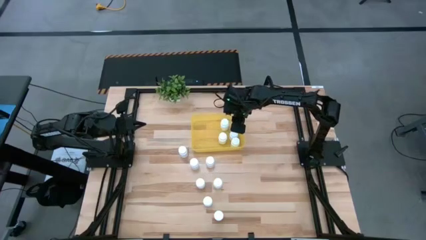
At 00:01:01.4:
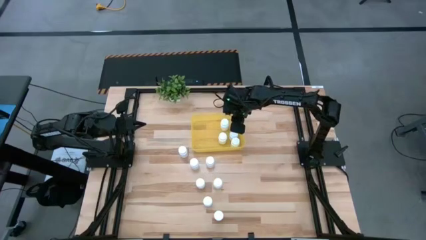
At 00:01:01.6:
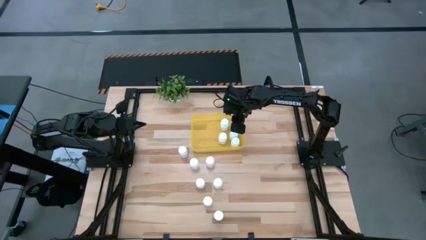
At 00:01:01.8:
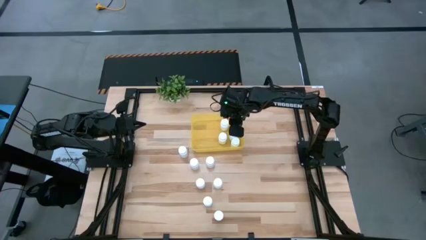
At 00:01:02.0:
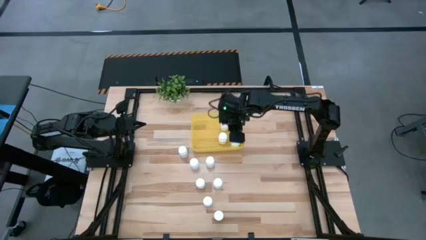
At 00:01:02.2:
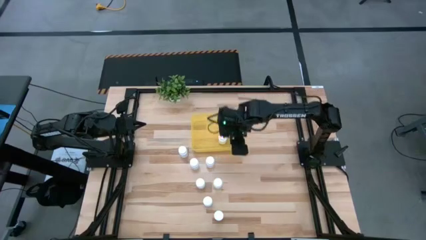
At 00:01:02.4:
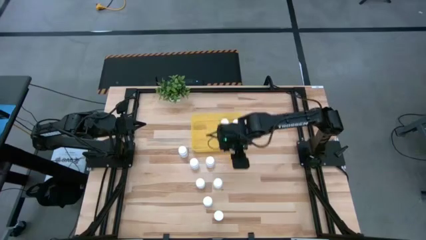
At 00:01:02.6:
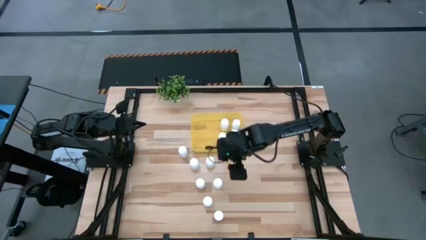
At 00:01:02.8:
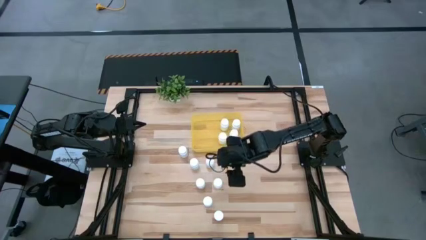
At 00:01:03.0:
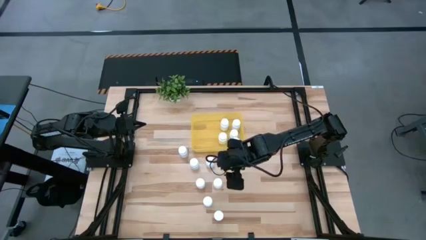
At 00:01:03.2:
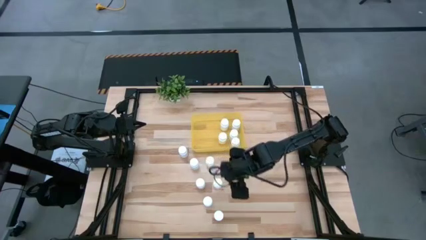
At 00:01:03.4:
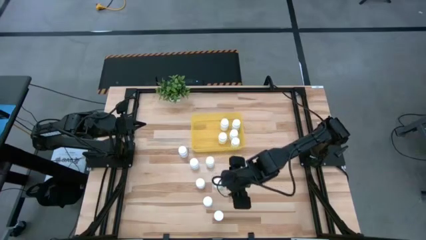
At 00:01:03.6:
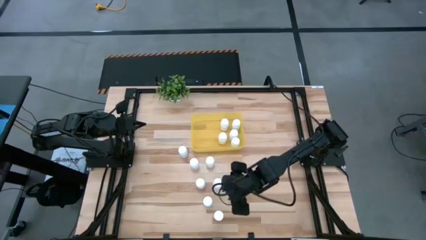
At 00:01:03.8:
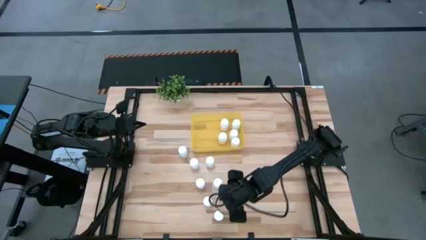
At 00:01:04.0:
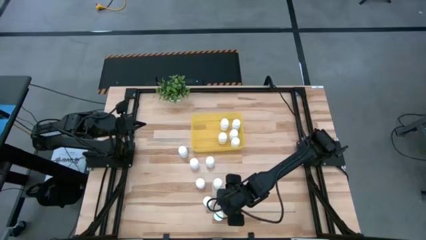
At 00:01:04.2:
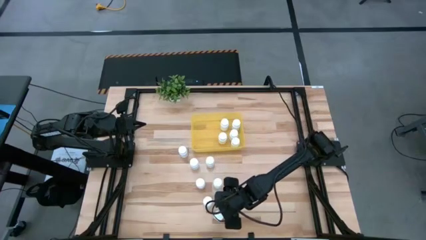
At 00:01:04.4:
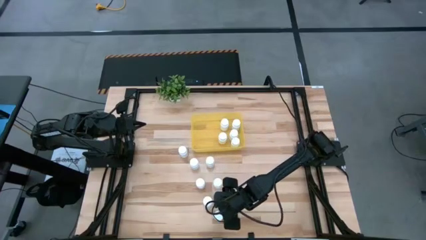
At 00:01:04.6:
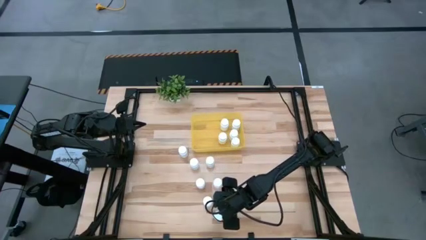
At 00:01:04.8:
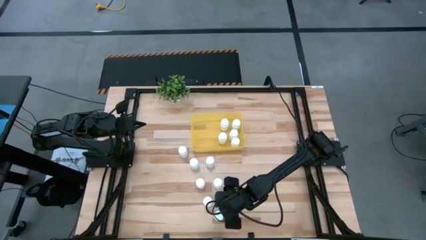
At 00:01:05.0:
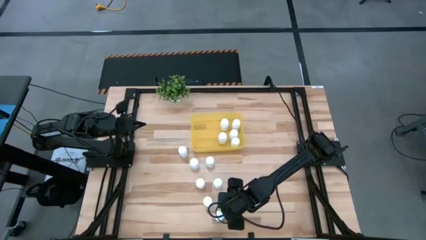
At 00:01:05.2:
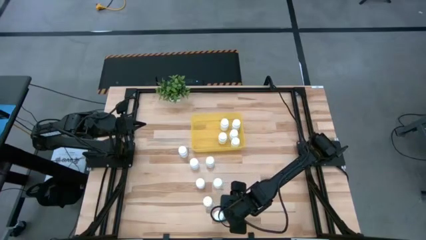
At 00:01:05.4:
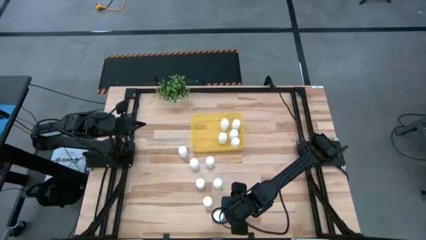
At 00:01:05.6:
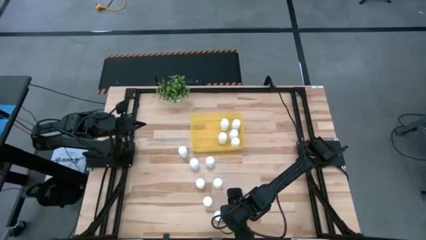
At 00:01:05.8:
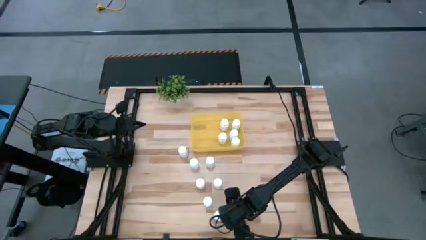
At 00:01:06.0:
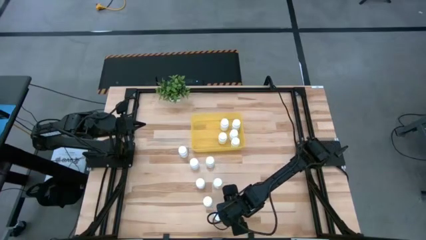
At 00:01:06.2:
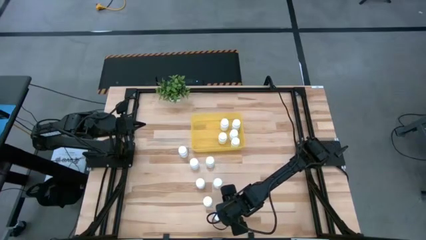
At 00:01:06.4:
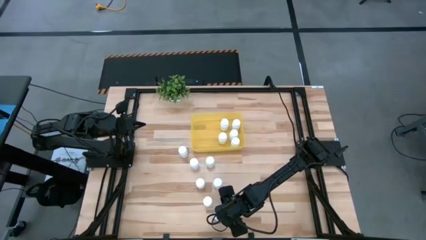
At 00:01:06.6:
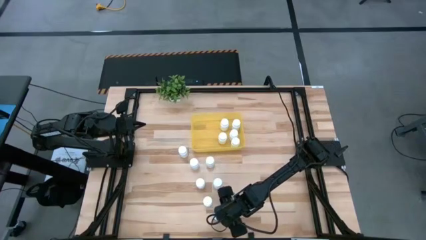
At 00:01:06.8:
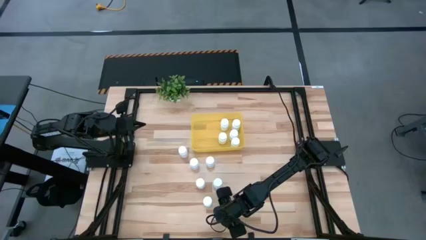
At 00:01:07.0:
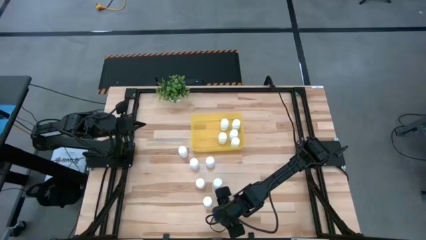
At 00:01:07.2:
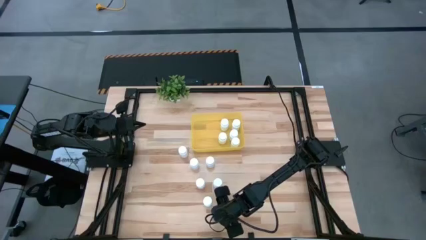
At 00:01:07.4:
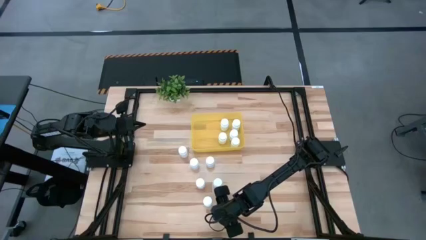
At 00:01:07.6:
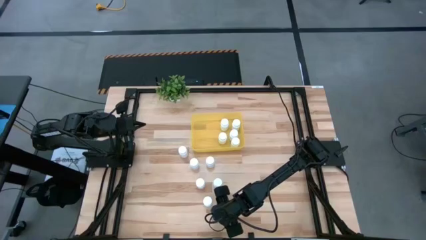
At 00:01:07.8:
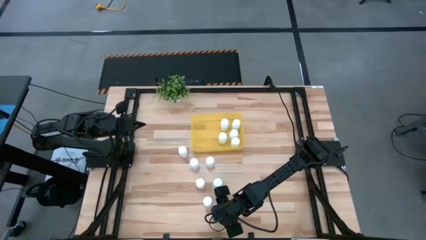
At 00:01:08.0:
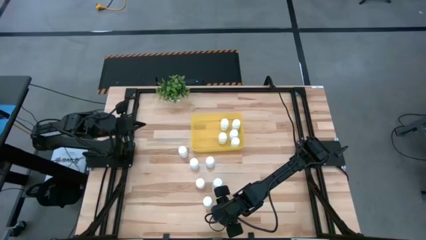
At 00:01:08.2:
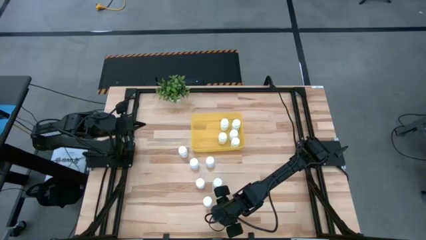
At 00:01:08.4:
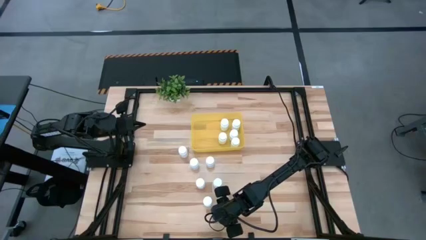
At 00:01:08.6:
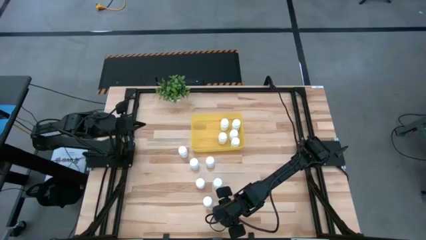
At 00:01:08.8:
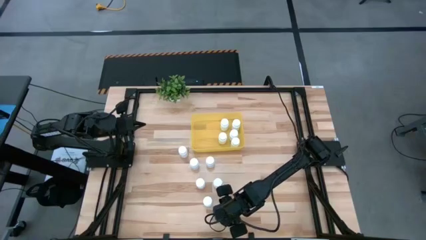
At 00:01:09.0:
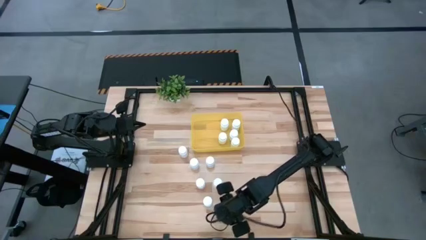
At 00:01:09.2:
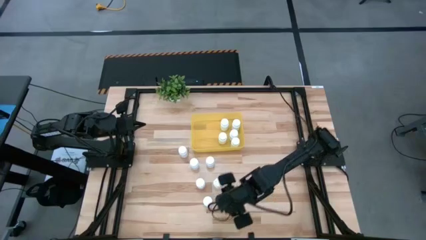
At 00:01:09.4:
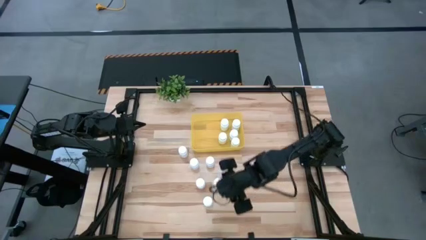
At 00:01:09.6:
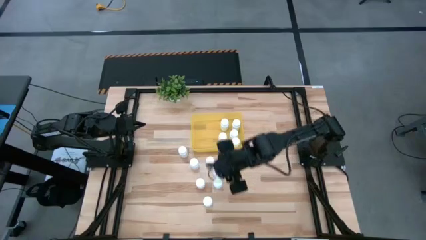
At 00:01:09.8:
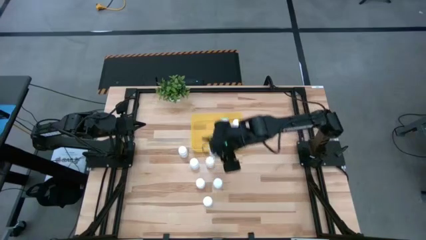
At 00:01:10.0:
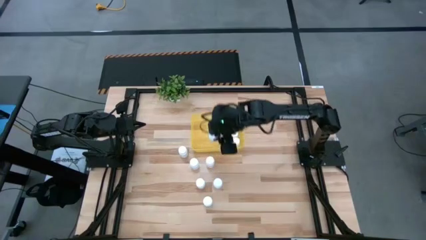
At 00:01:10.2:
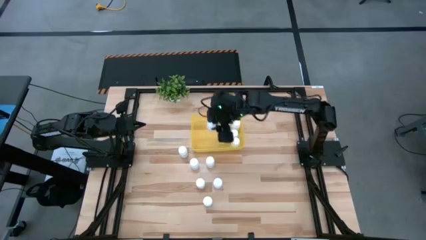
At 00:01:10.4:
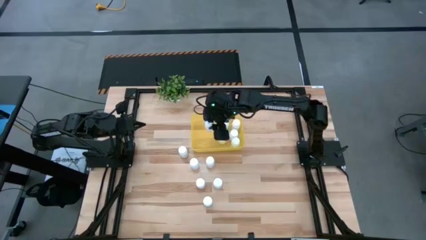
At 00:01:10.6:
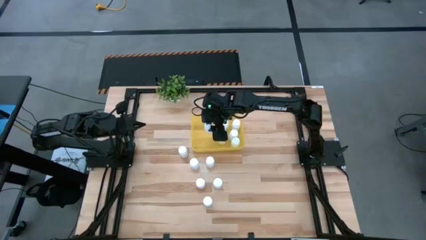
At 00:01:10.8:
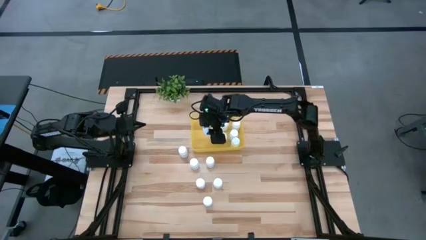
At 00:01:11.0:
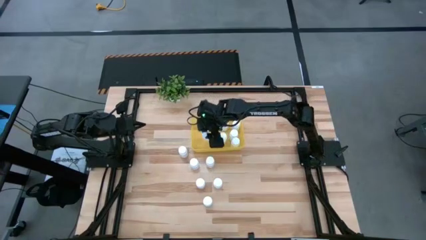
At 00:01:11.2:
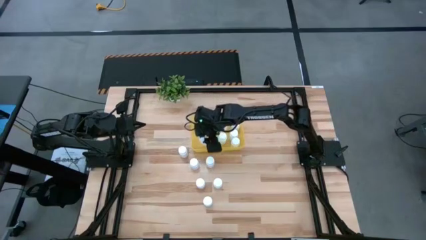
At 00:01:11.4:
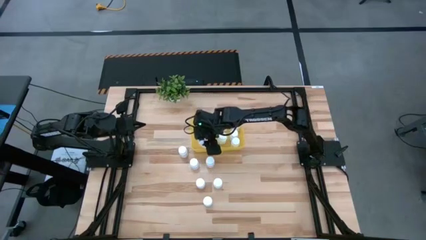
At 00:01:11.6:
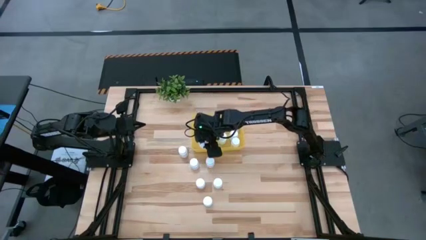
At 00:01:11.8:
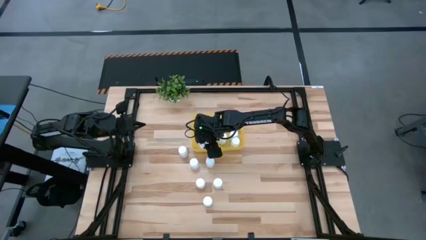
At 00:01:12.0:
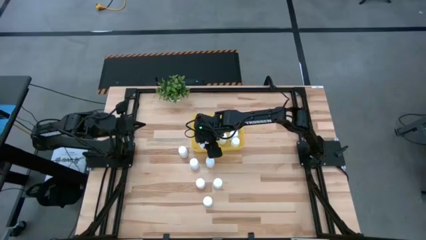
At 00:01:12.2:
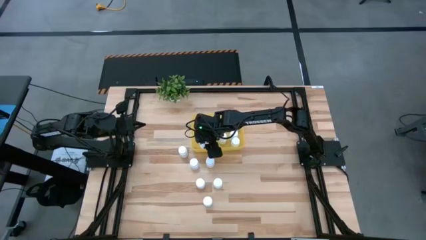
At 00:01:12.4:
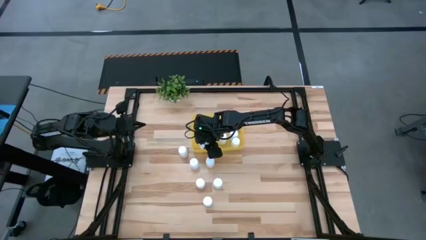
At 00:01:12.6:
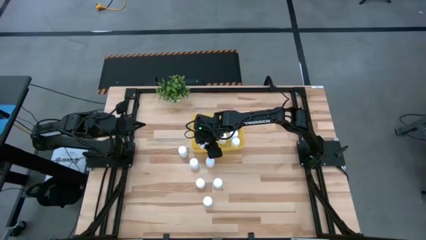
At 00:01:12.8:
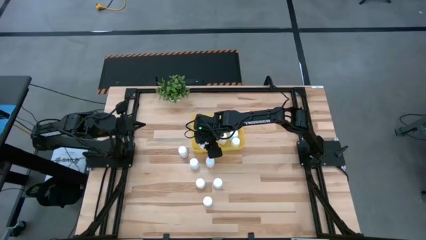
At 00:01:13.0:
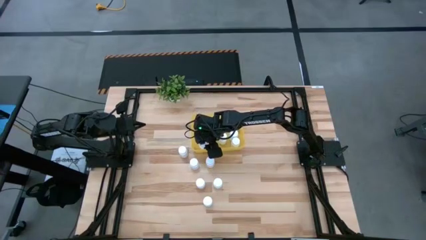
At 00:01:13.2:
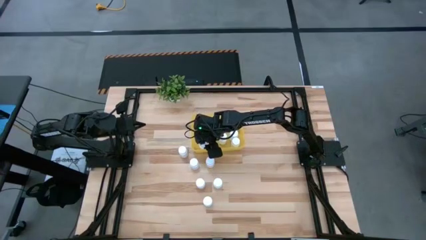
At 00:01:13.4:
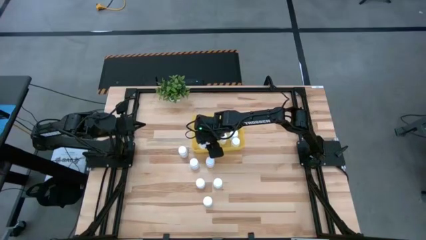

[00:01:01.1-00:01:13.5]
Task: Pick and place pill bottles into a basket
Put the white medicine bottle into the yellow bin
